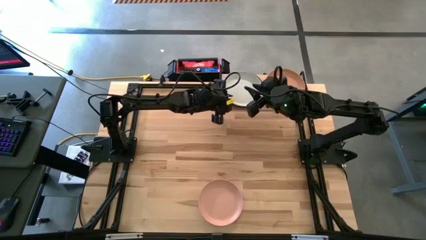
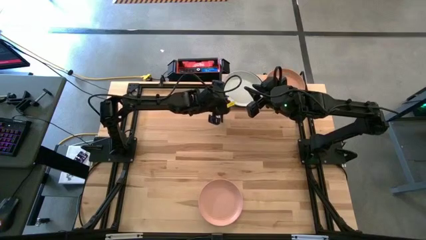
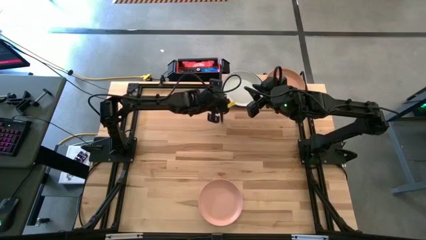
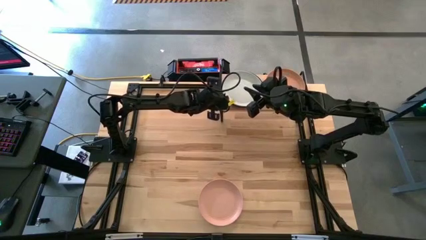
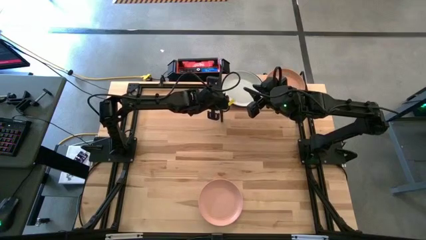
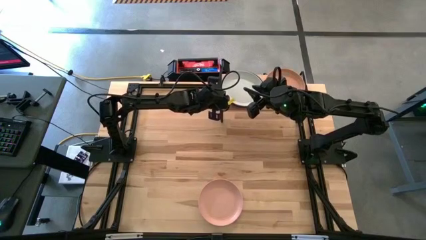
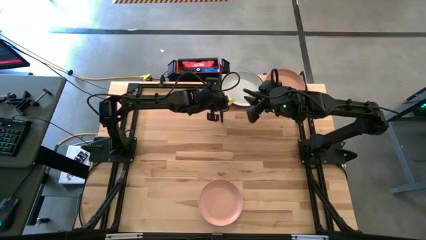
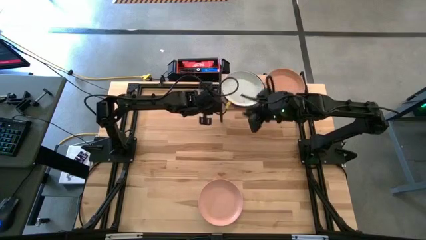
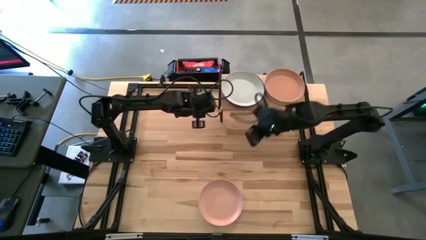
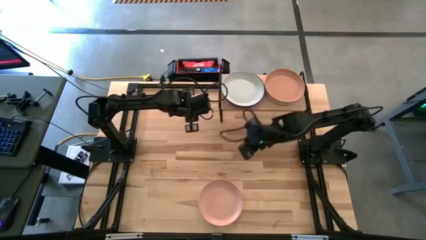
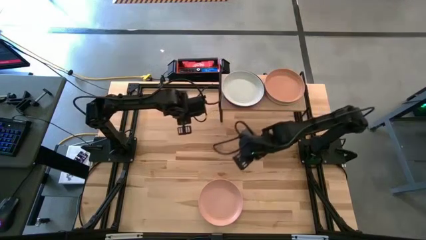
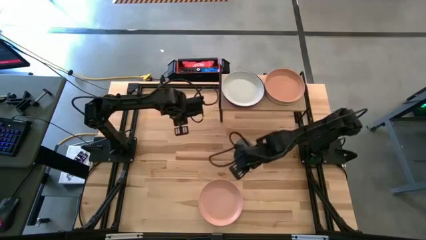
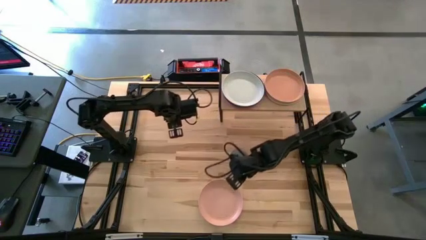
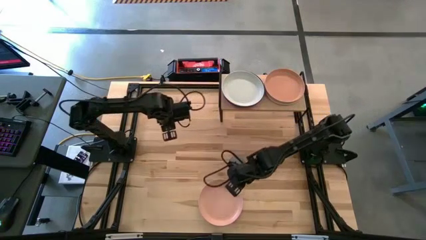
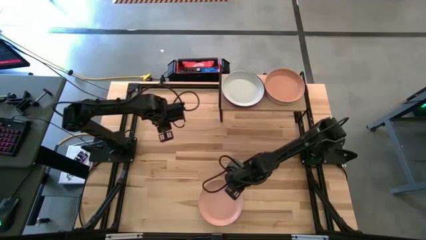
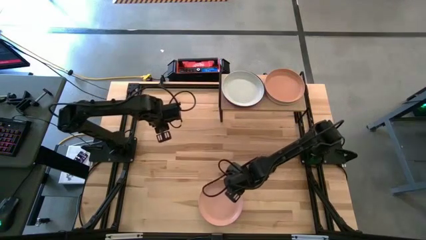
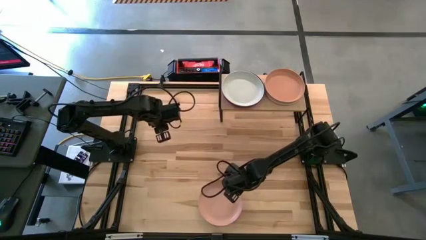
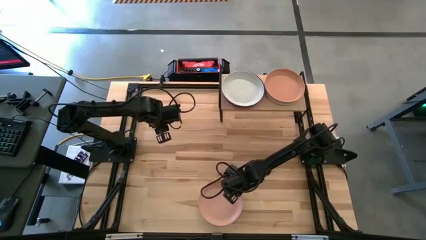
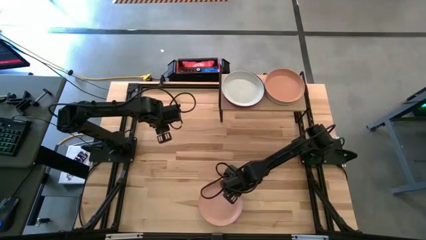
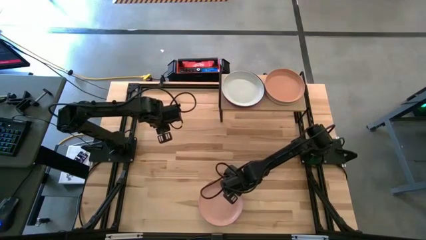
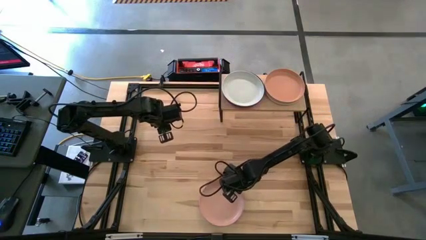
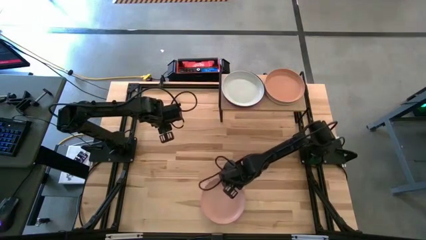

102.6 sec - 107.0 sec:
Task: Place and stack plates onto a shelf
Stack the light pink plate on top of the light gray plate

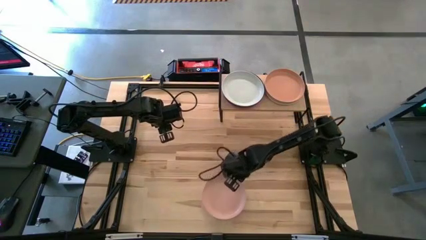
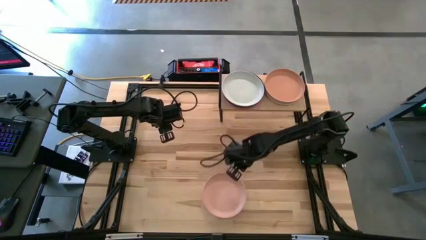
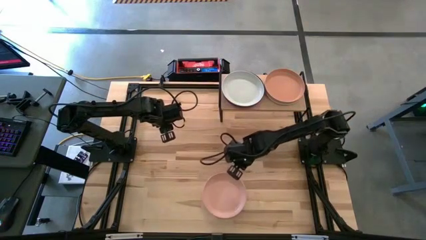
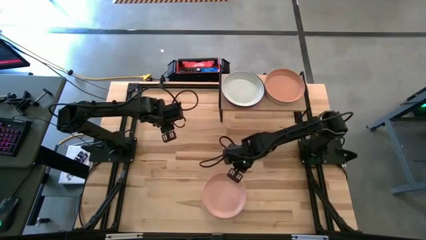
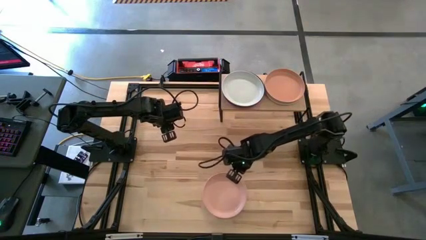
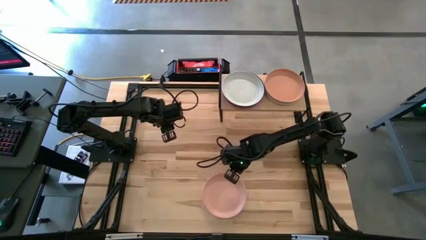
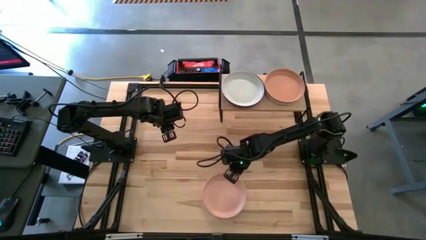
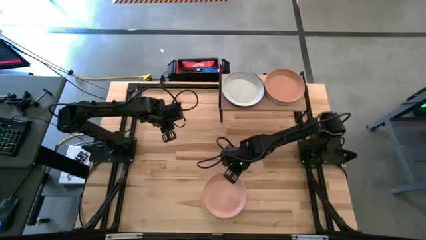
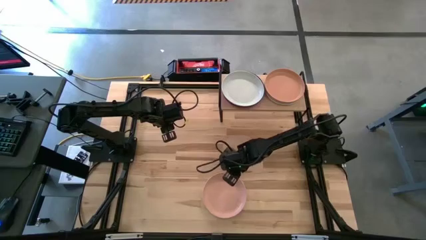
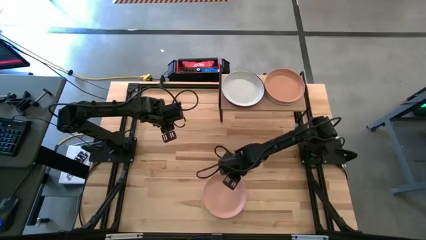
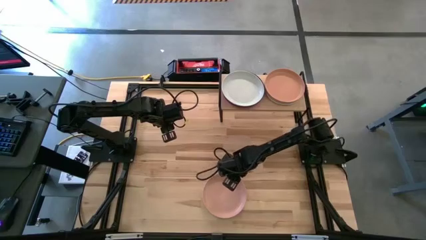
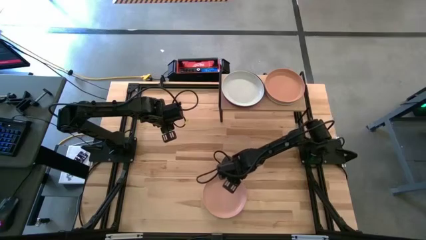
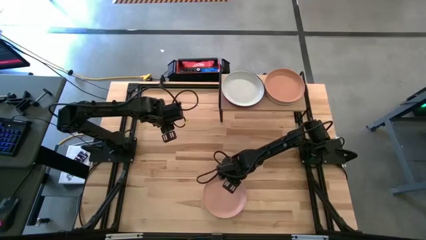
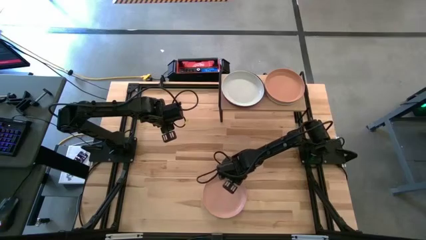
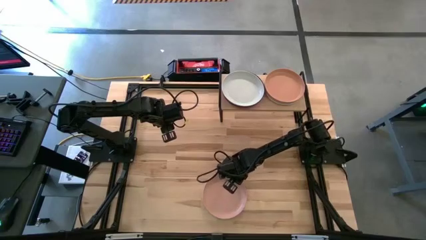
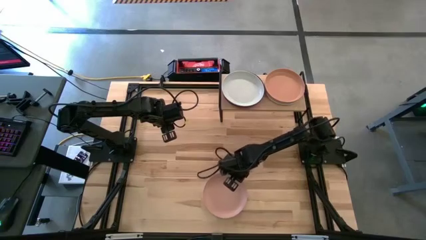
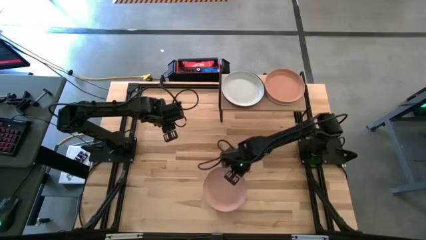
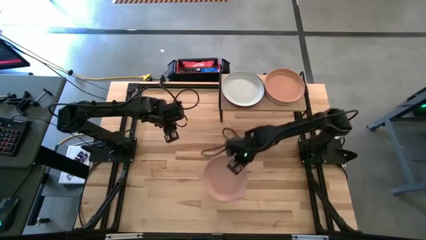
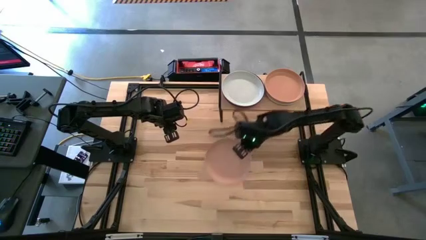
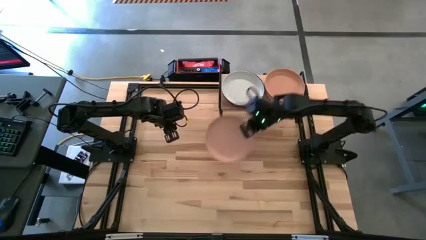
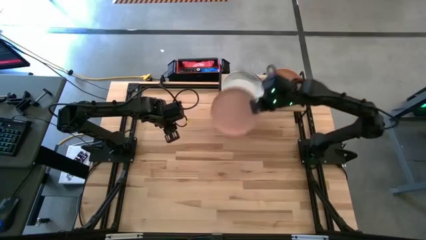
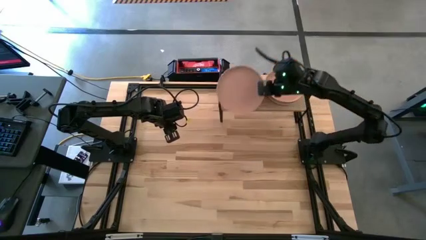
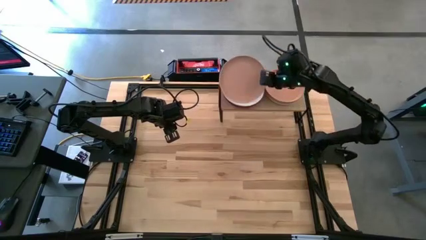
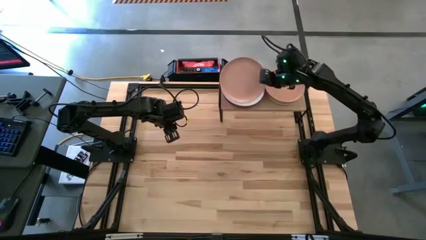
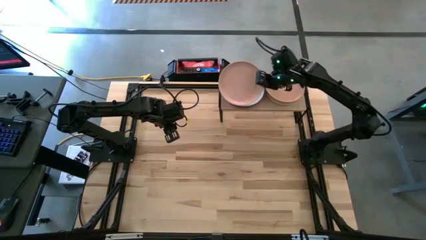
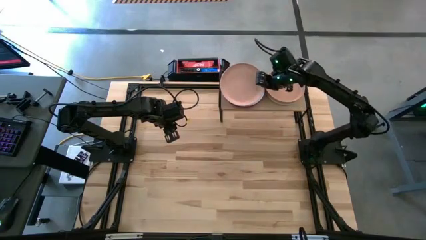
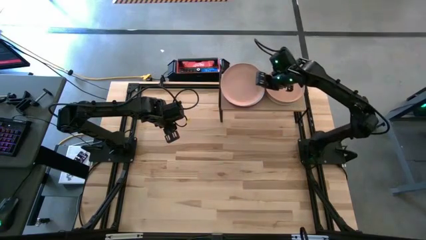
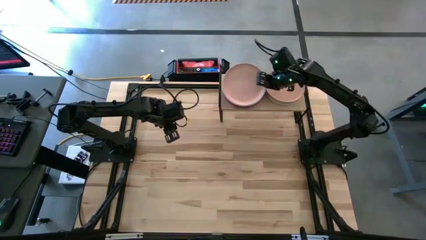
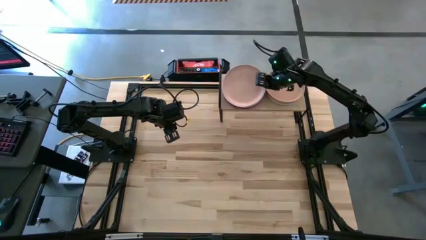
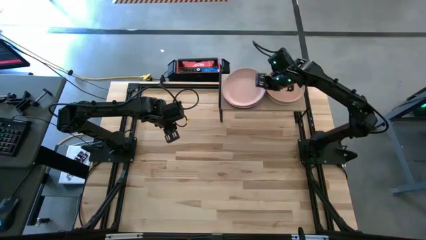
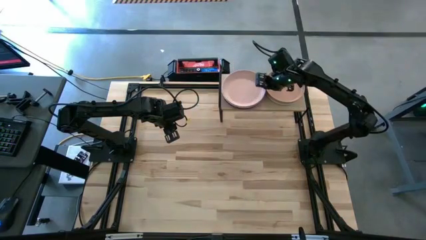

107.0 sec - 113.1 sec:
Stack the light pink plate on top of the light gray plate

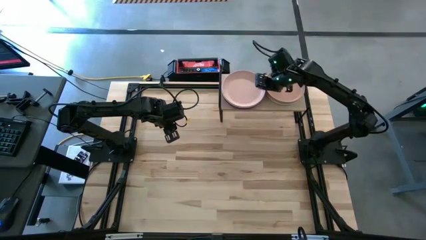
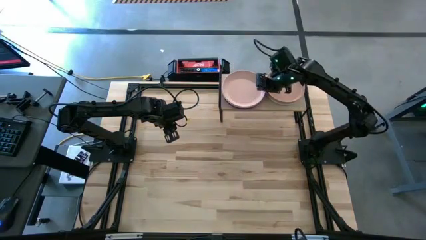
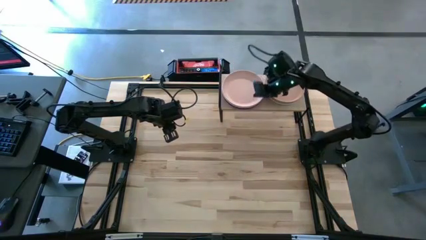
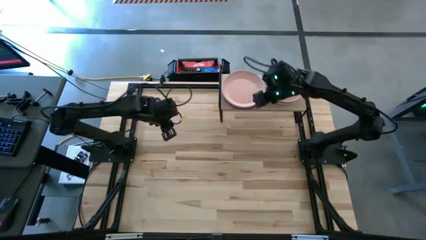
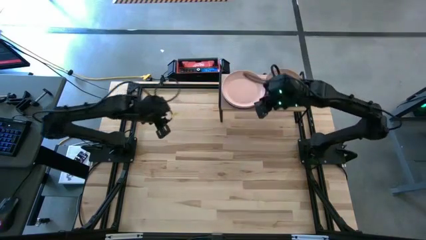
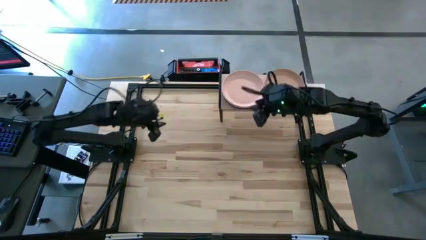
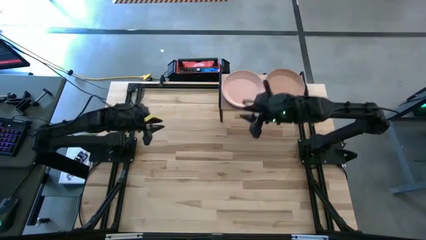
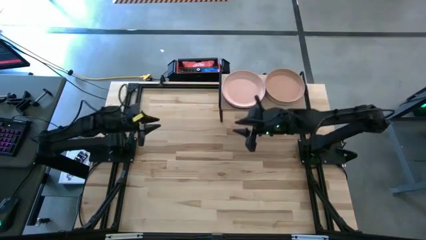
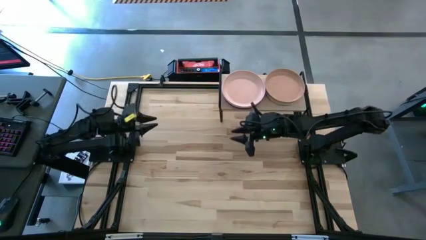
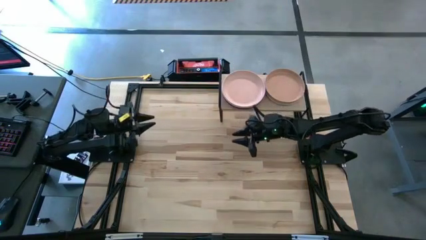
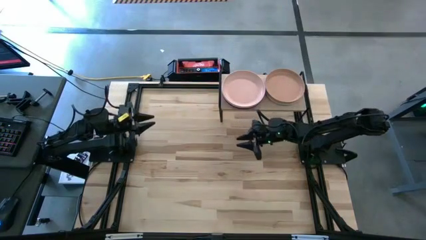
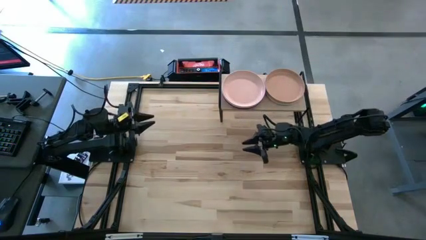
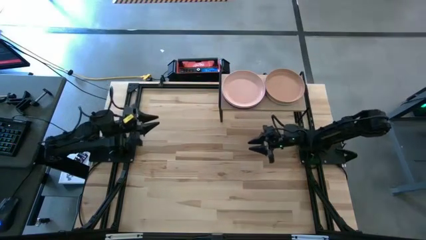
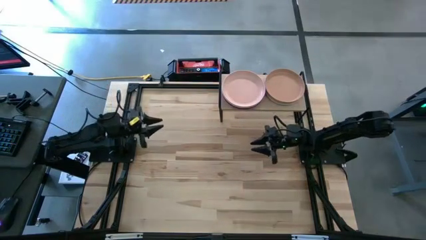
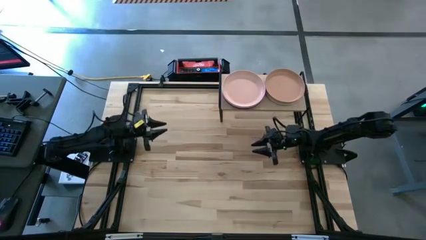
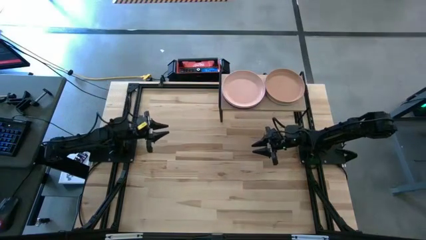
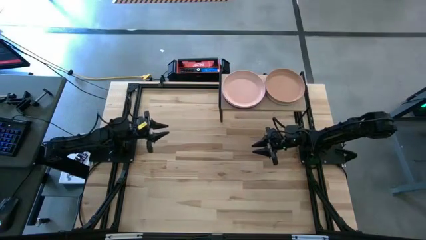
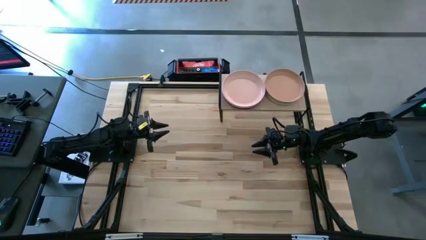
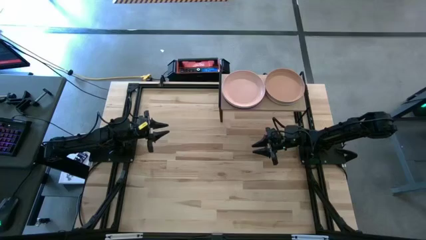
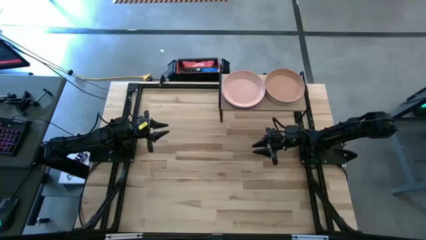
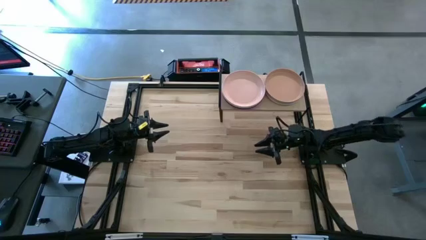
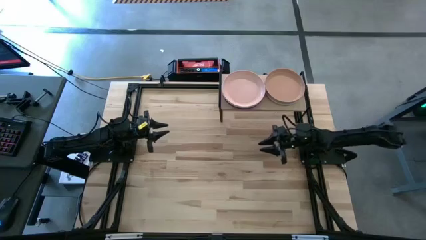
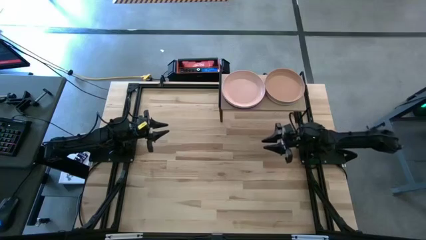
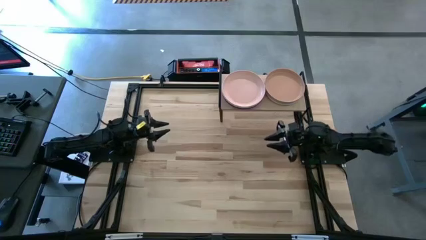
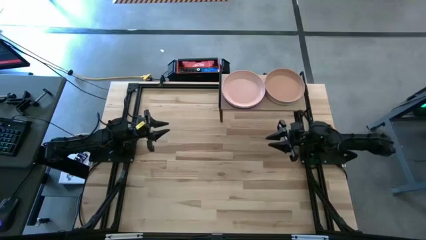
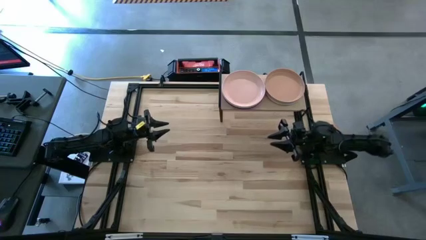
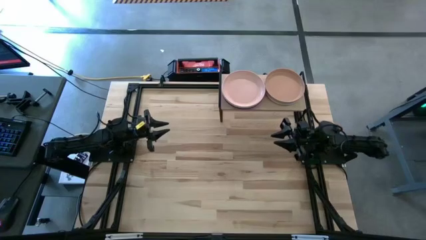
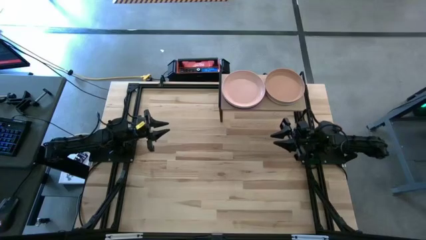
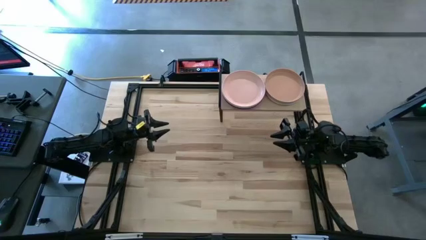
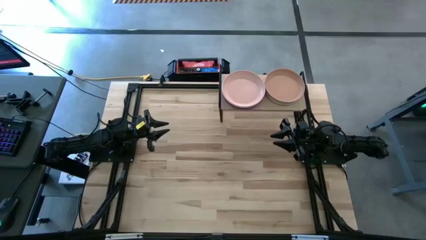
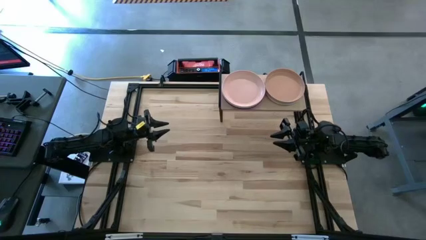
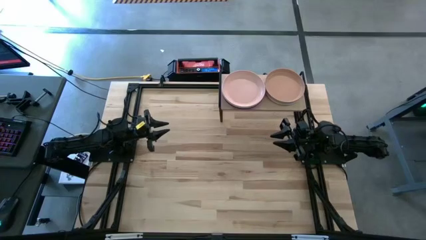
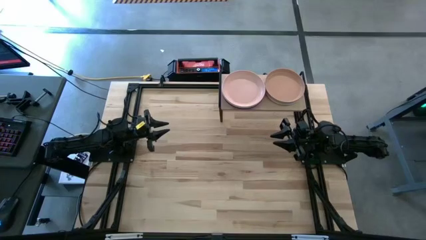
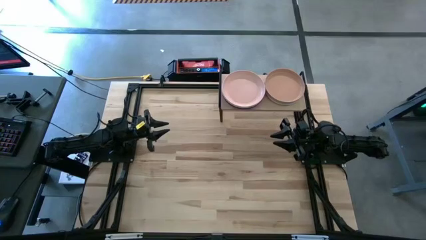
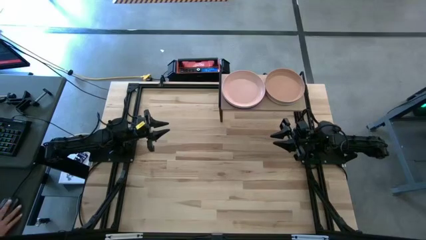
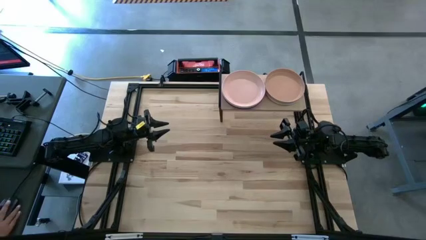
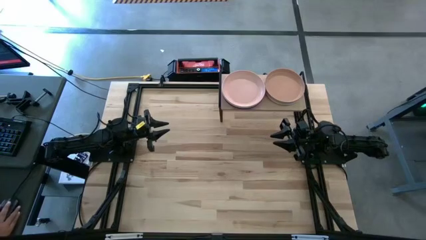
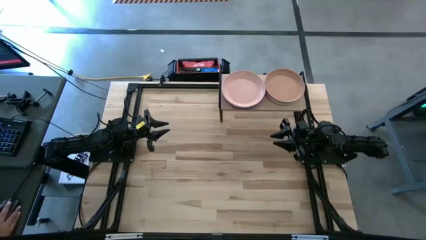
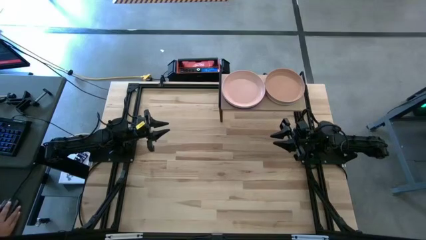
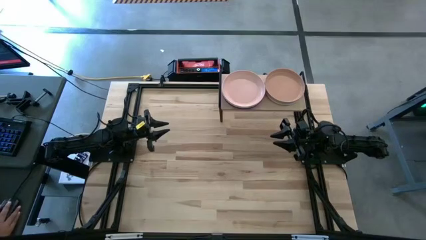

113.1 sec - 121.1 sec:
Return to Home Position
